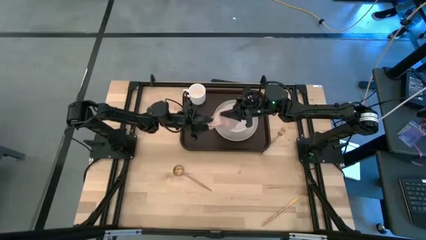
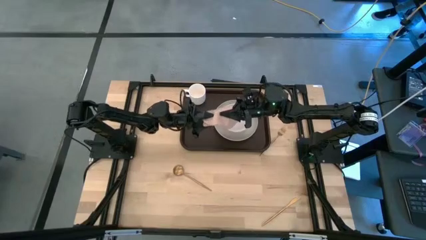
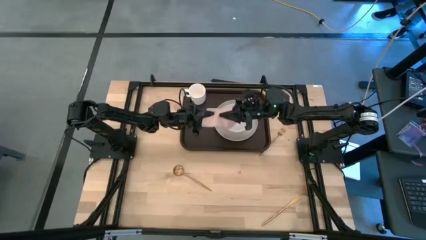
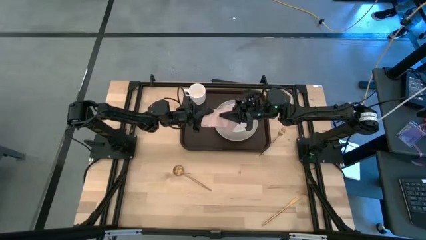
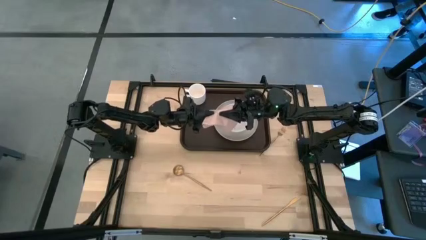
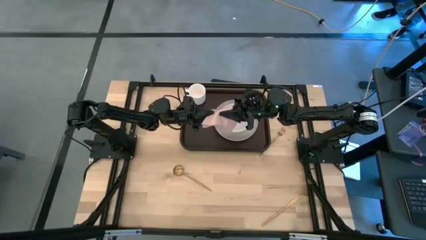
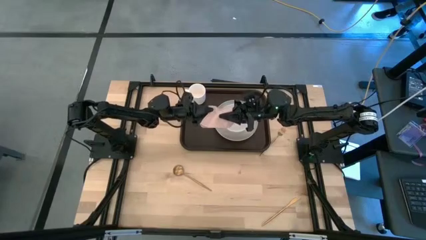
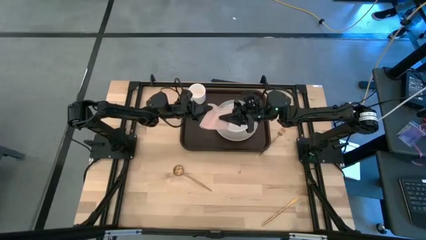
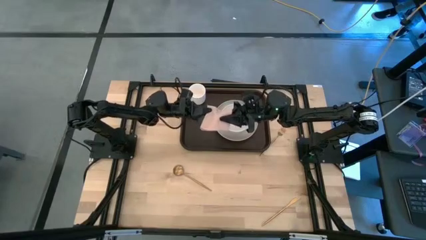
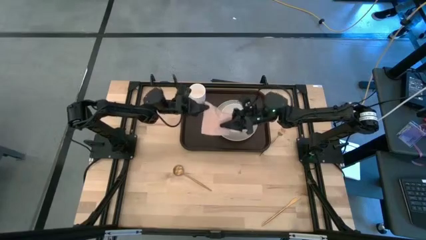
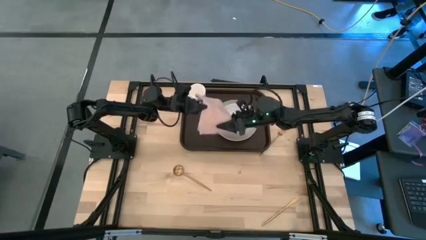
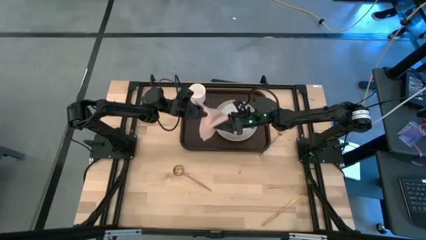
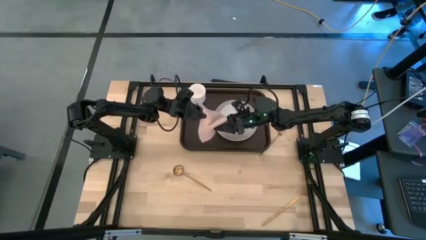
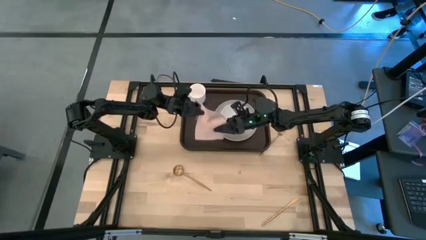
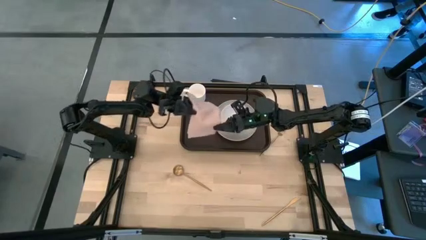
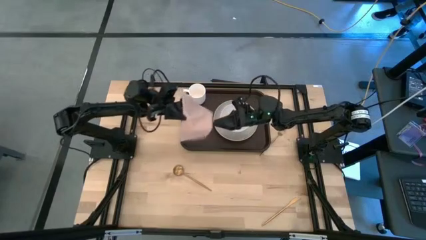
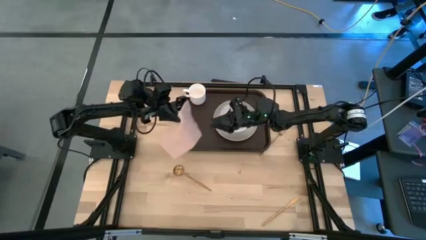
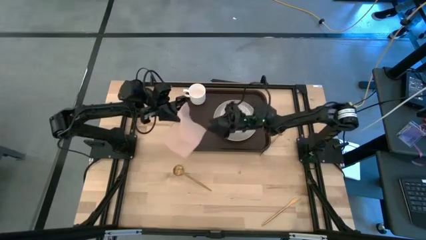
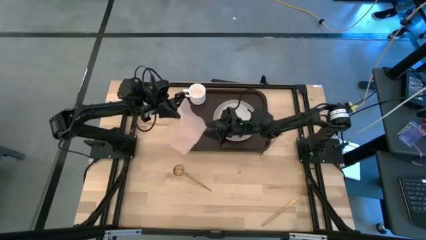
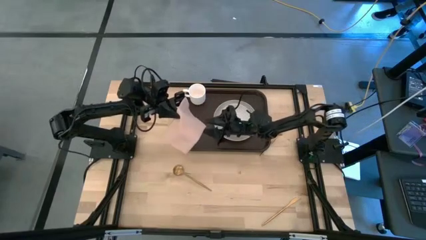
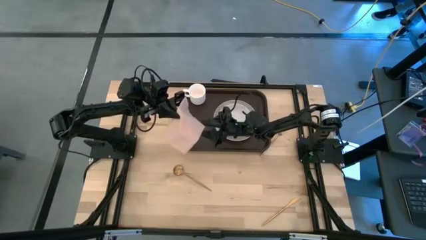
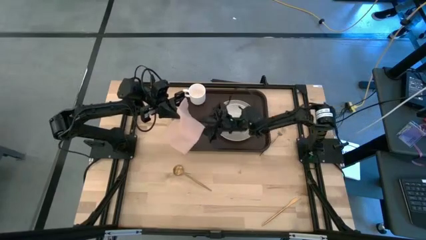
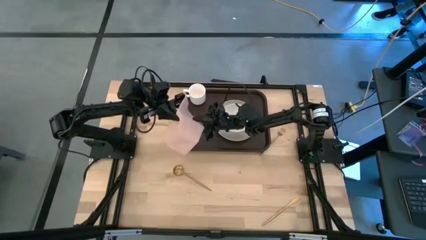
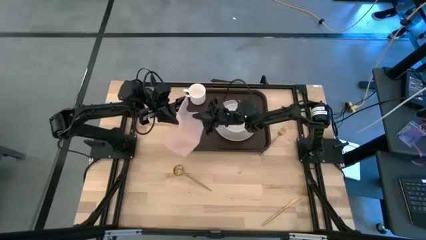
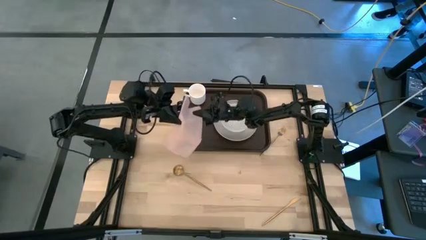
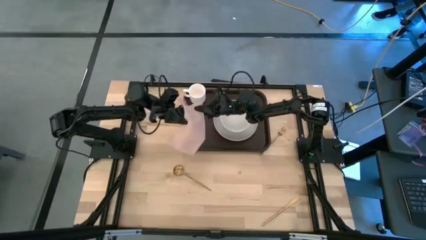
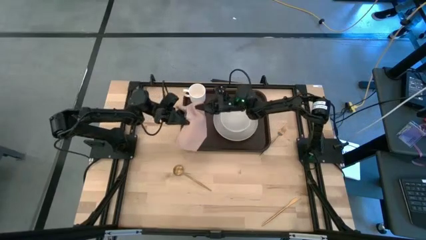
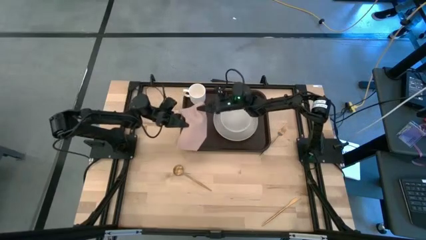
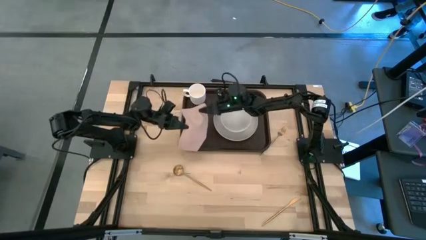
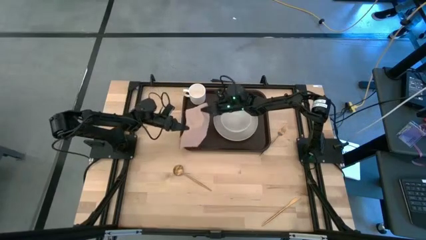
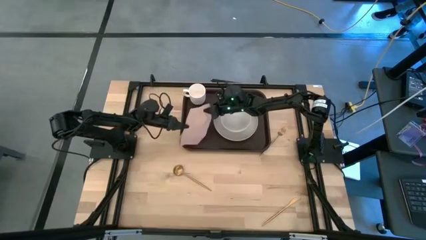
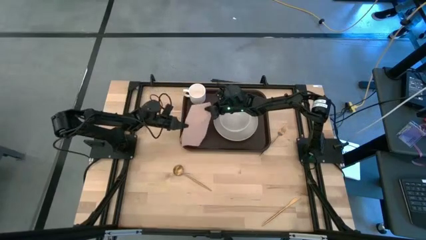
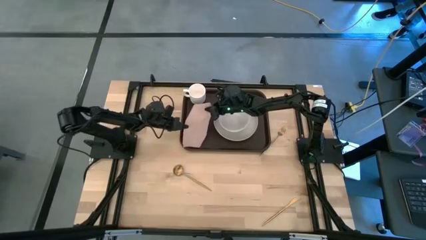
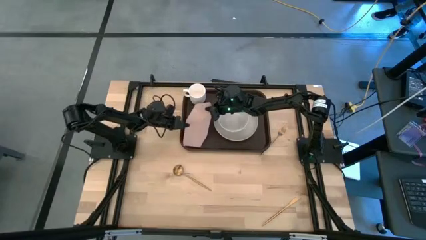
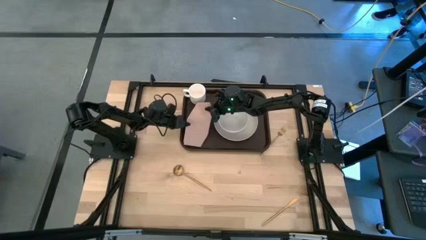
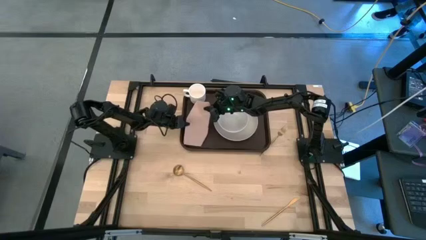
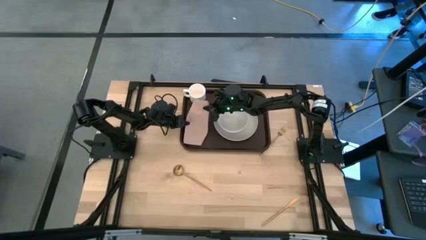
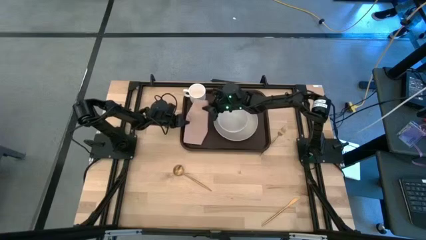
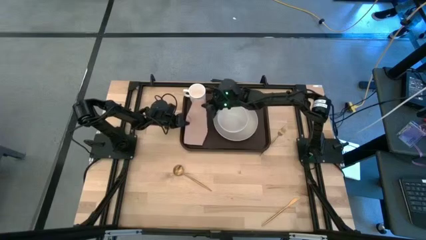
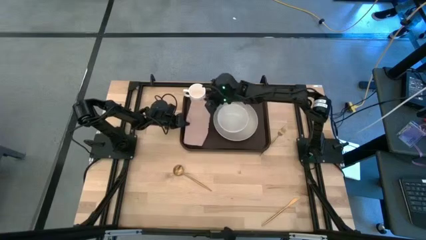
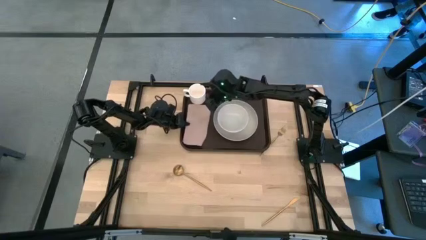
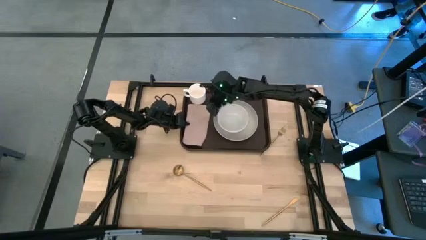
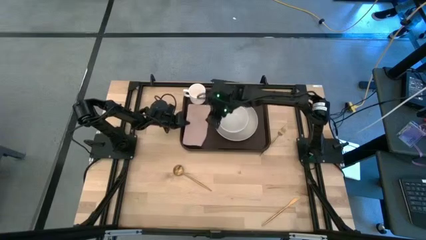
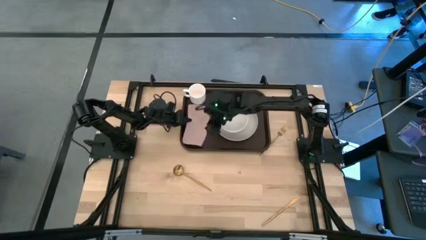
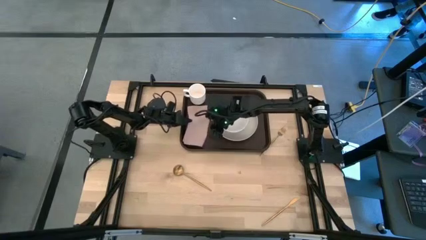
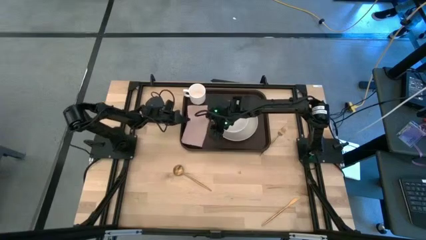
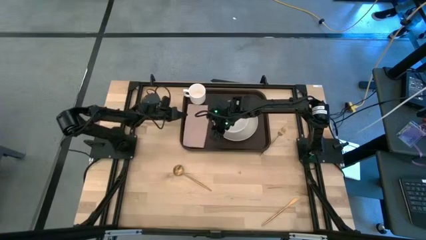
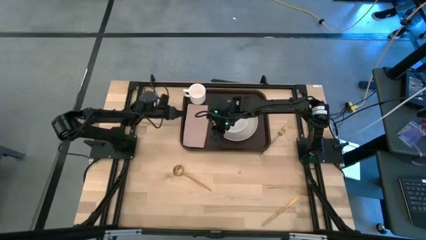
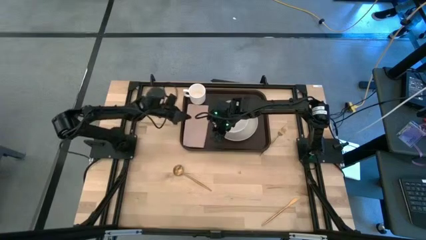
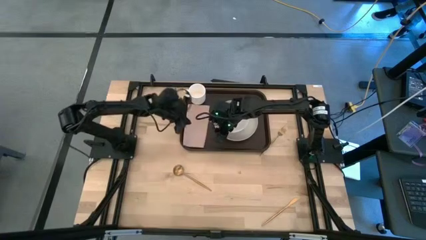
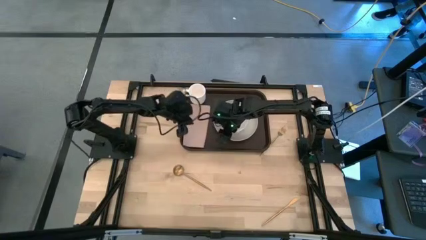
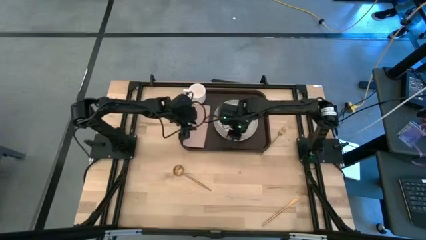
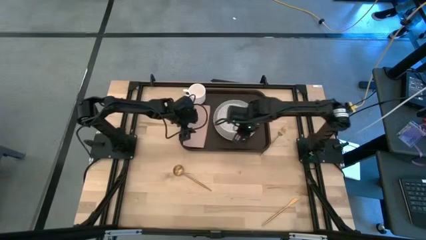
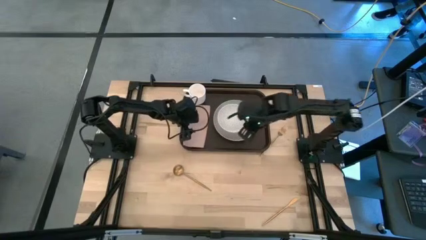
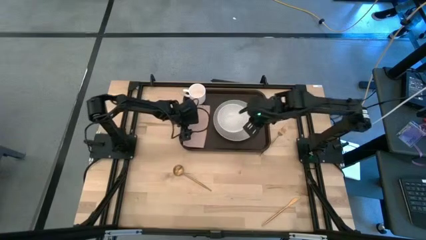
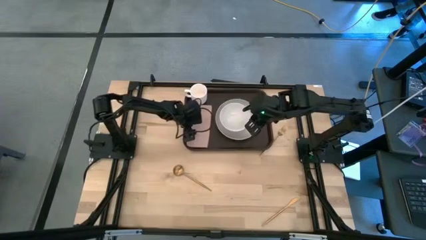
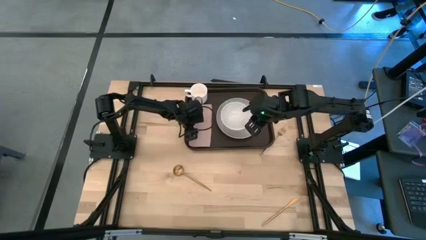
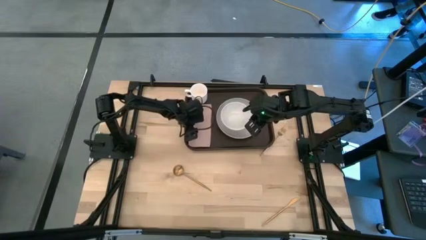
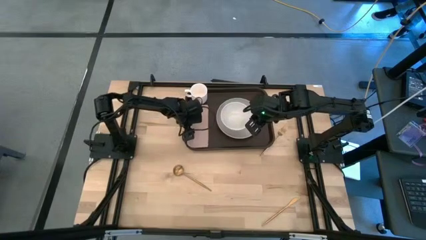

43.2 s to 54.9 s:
Task: Set up tray
Put the light brown napkin on the brown serving tray to the left of the gray plate

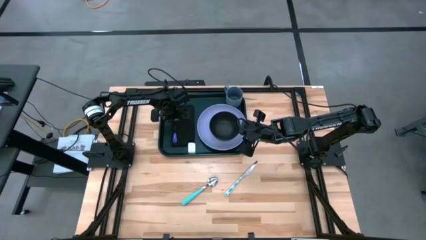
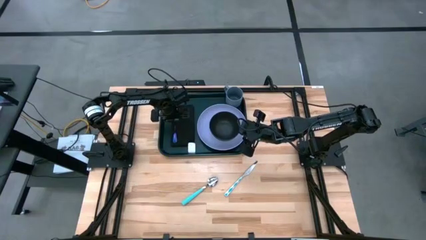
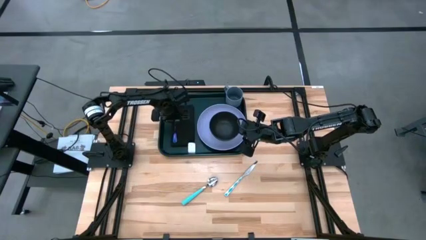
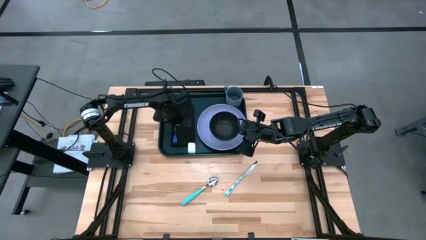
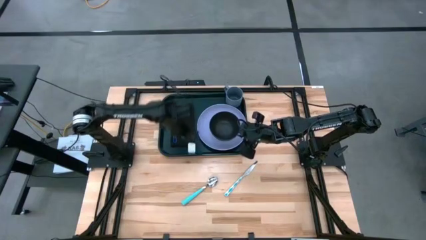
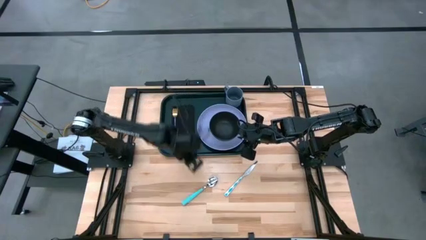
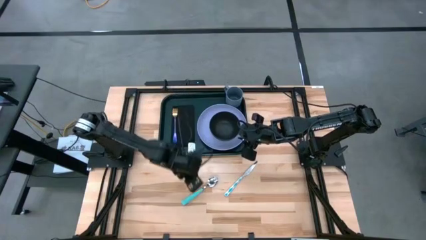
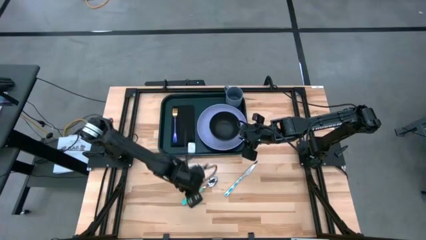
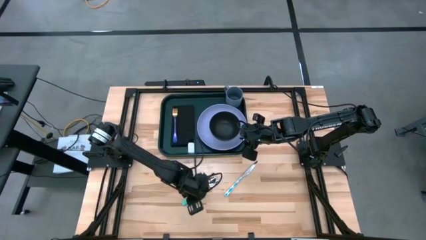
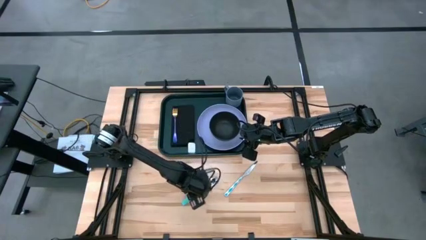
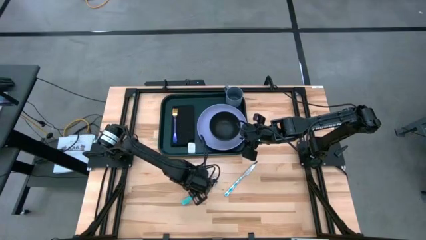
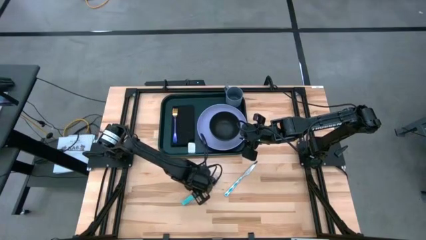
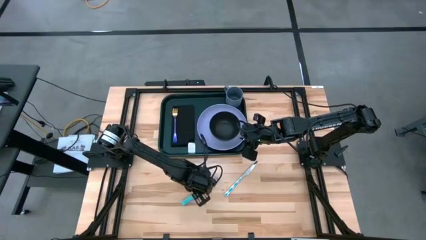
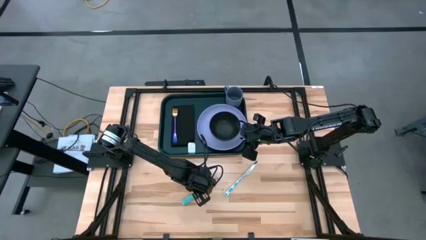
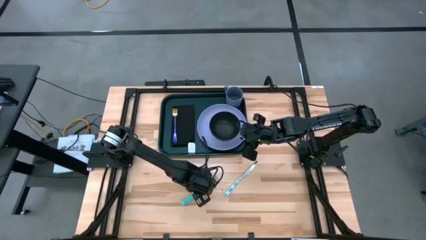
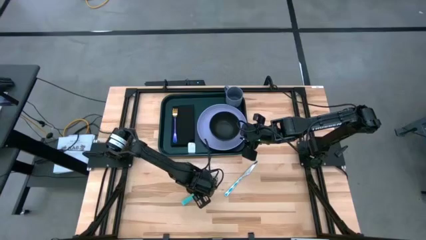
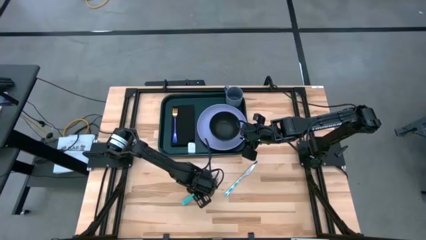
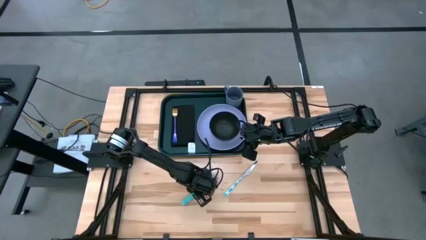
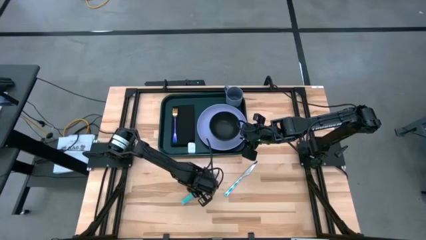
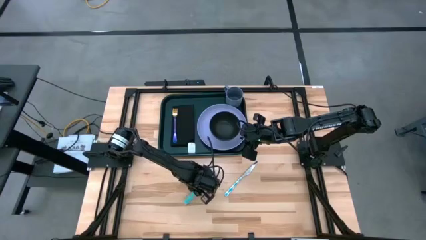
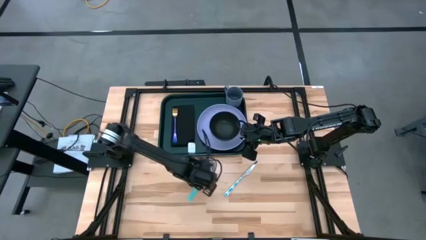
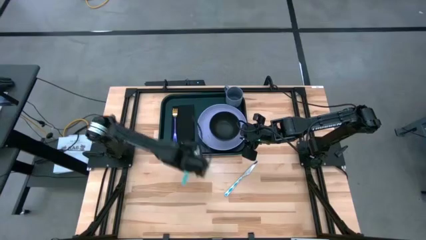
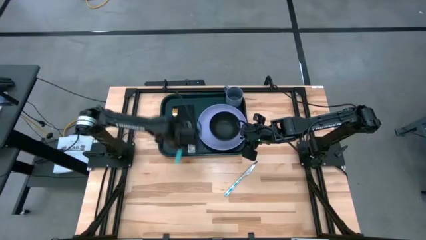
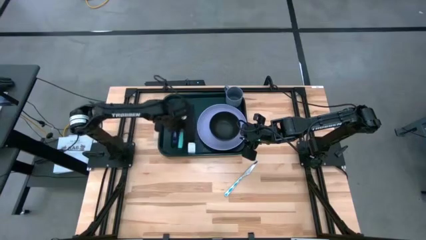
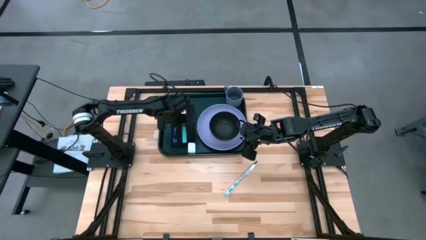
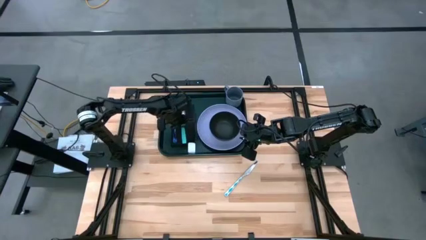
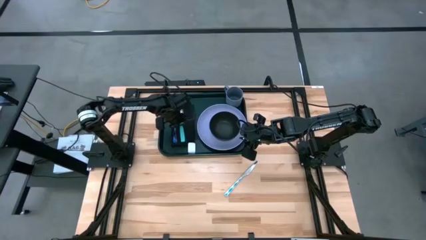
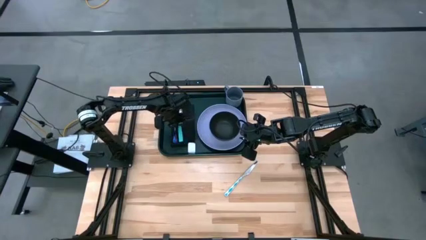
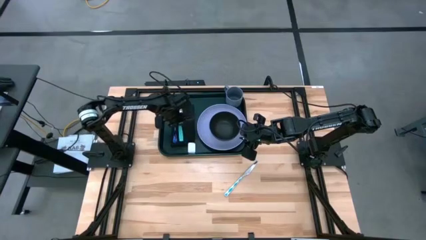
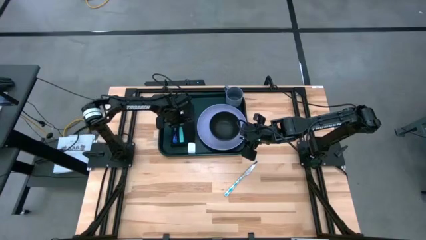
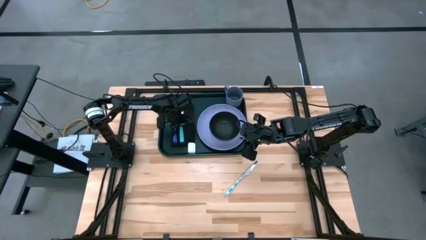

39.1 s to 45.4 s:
Task: Set up tray
Put the spoon on the napkin beside the fork on the serving tray
